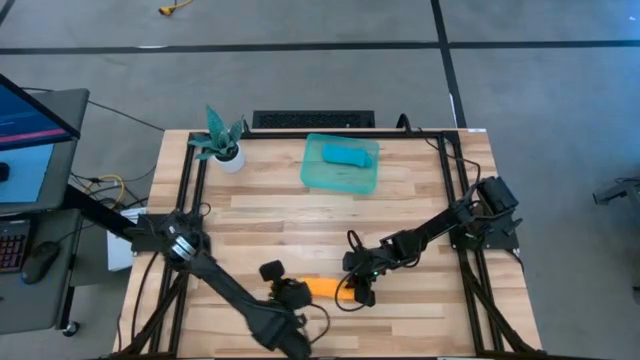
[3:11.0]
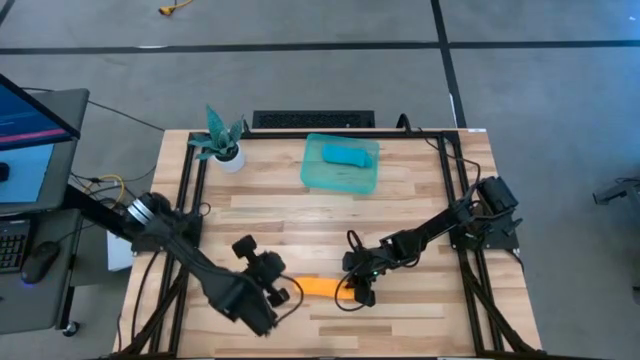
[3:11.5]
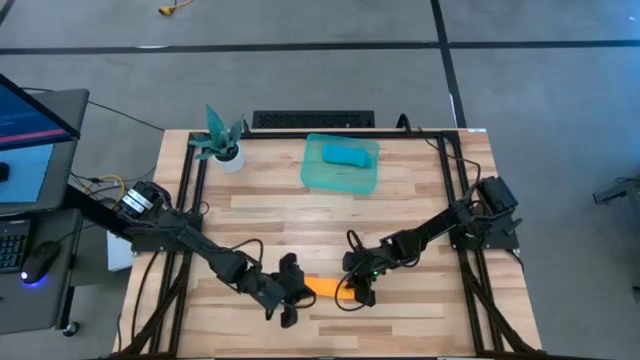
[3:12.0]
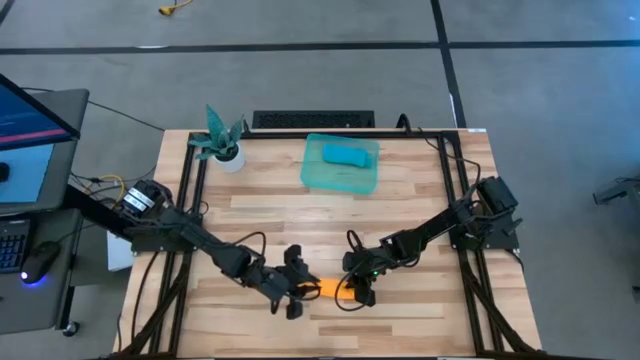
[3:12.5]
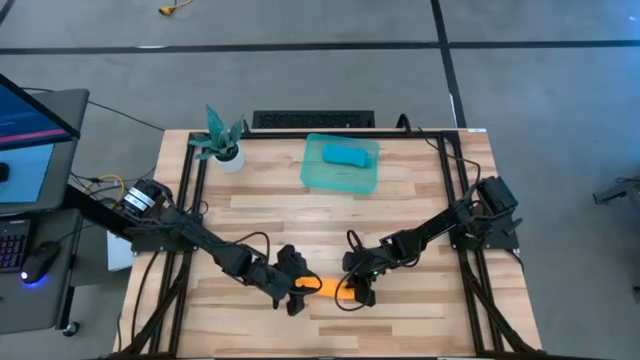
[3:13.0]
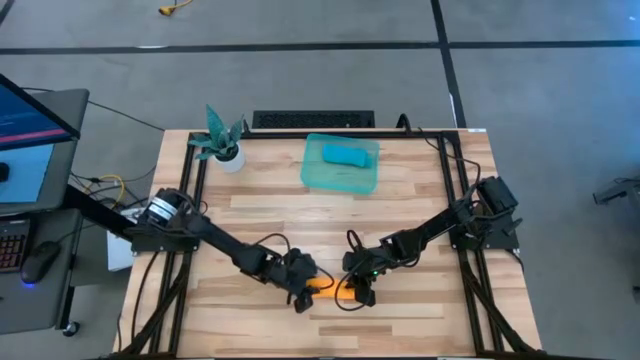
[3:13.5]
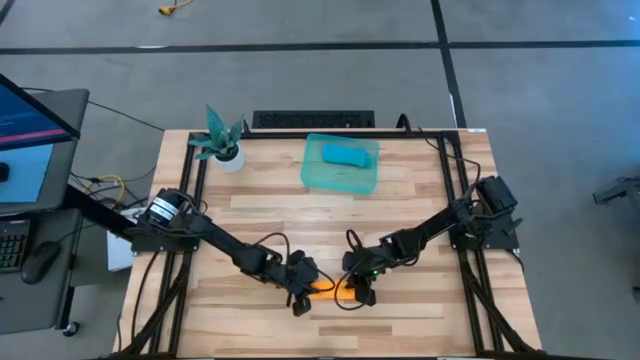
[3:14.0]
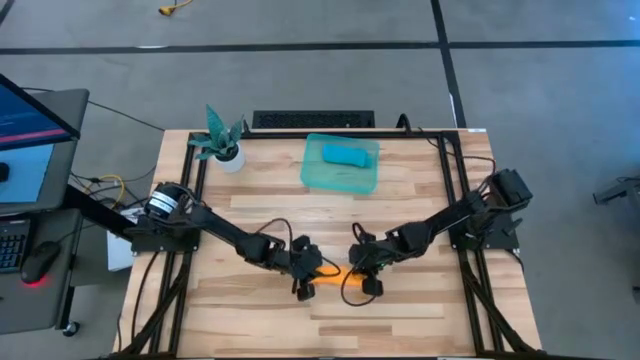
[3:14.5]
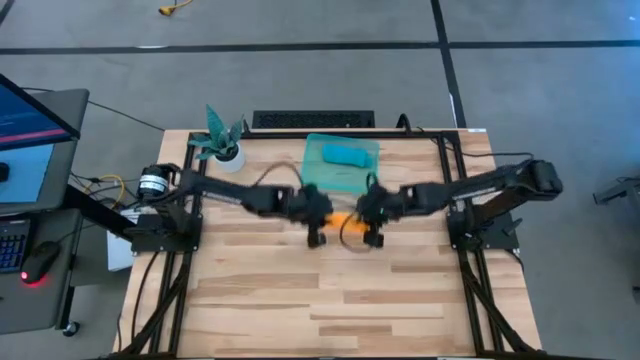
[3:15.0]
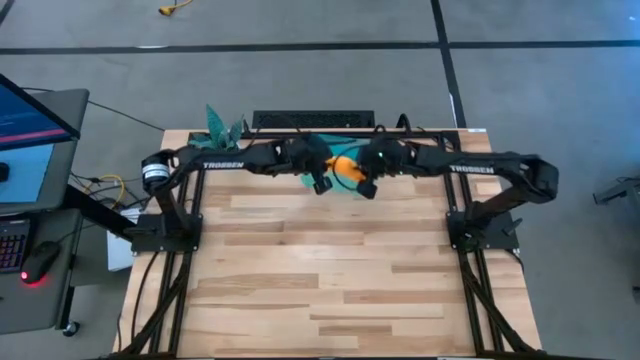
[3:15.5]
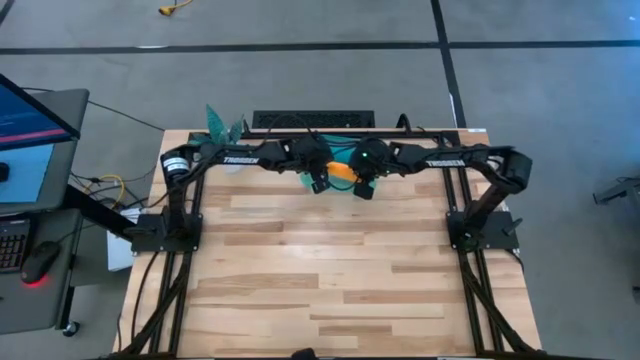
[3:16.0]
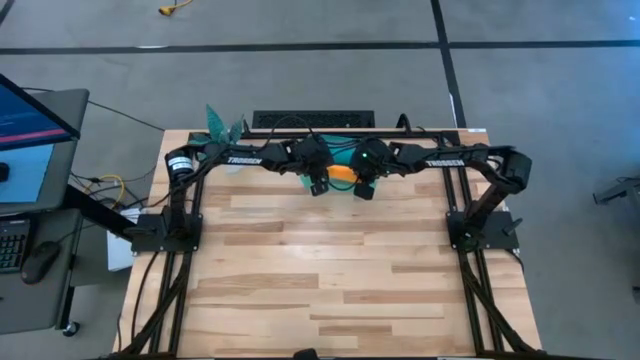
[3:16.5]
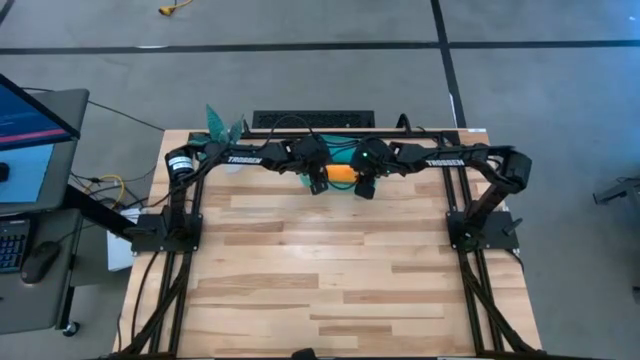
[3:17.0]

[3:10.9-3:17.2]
Task: Roll microfiber towels into tight, uniform cylinder then place into a basket
Put the rolled yellow microfiber towel into the green bin

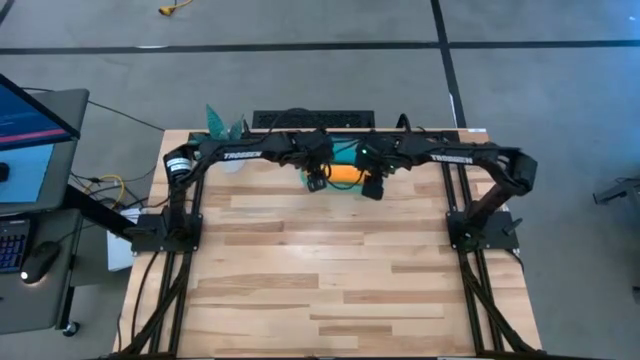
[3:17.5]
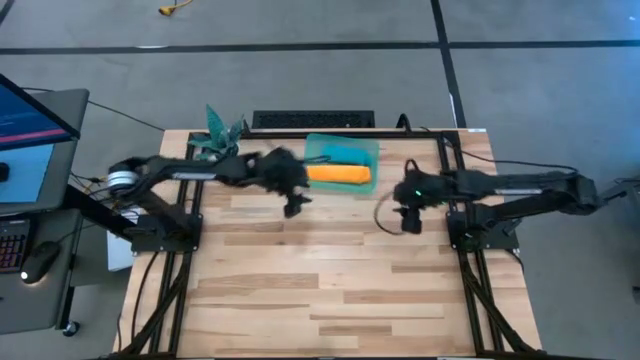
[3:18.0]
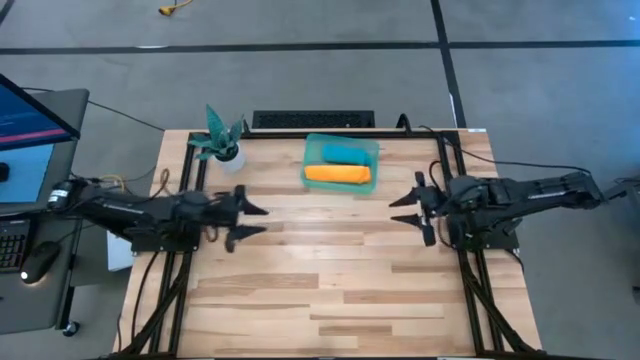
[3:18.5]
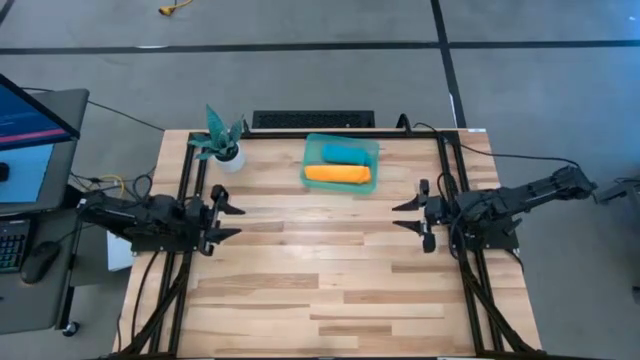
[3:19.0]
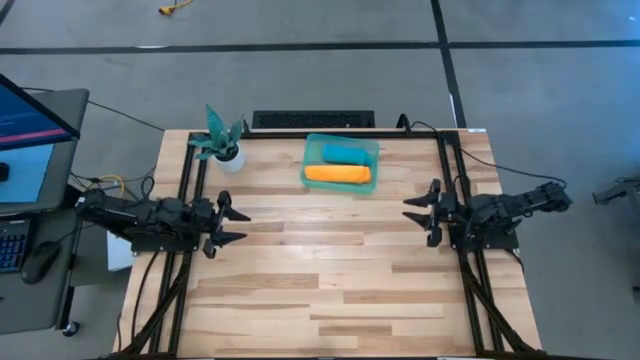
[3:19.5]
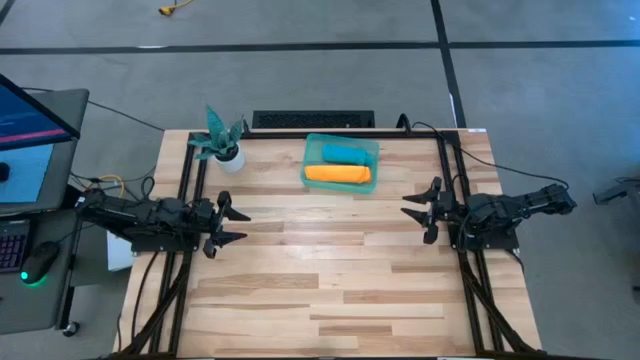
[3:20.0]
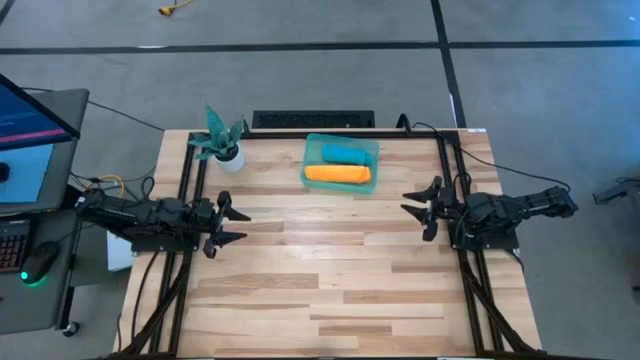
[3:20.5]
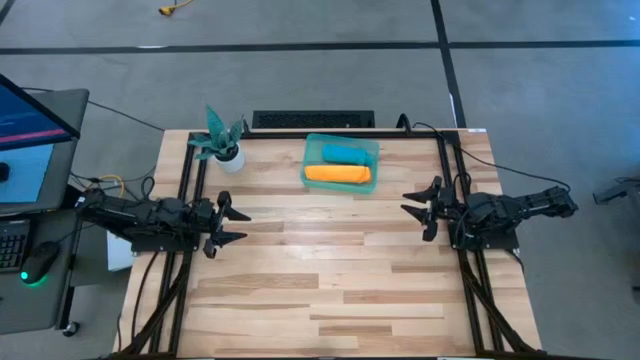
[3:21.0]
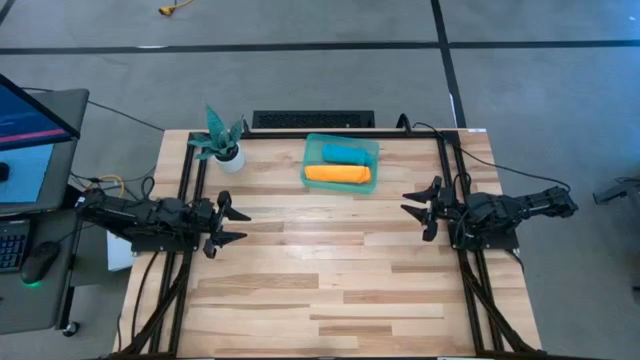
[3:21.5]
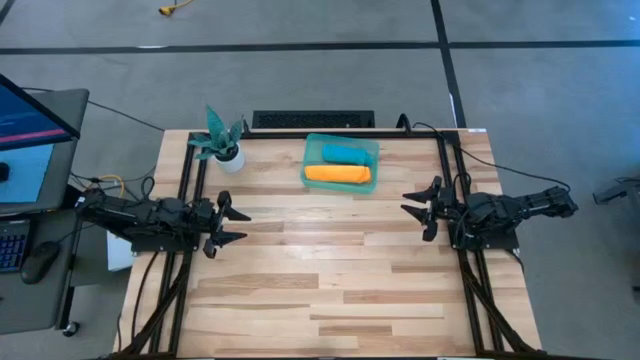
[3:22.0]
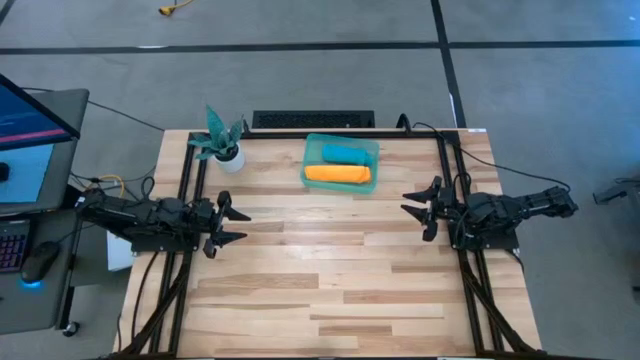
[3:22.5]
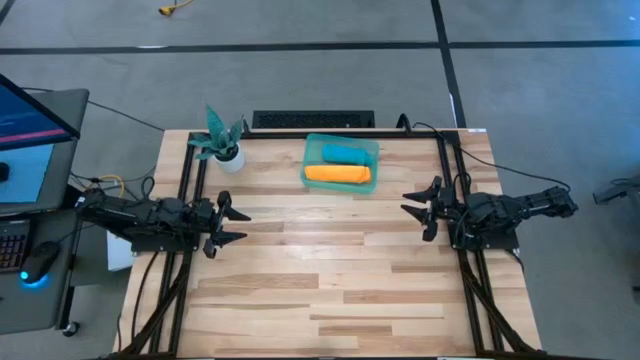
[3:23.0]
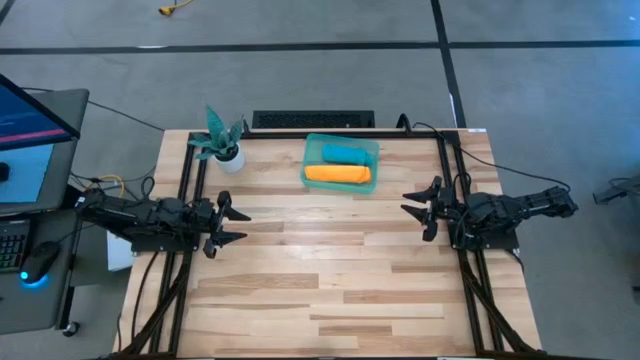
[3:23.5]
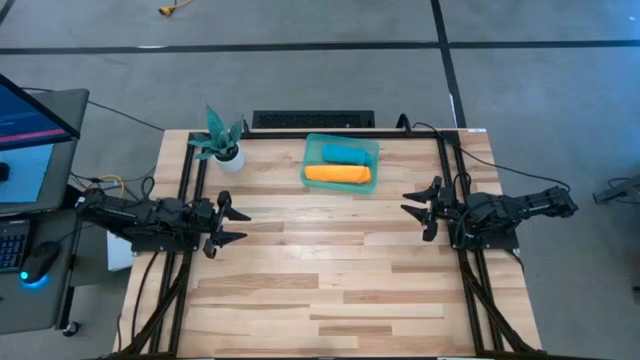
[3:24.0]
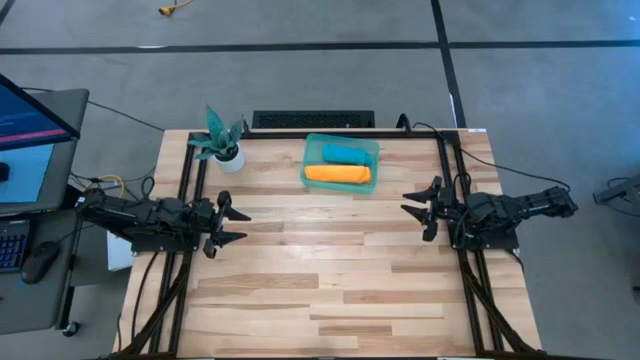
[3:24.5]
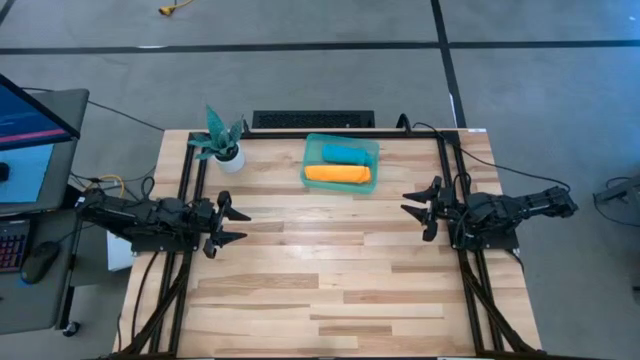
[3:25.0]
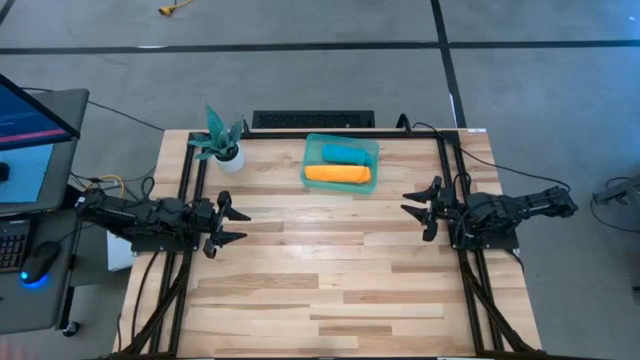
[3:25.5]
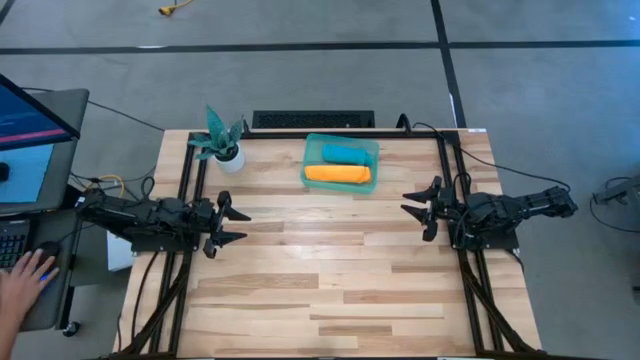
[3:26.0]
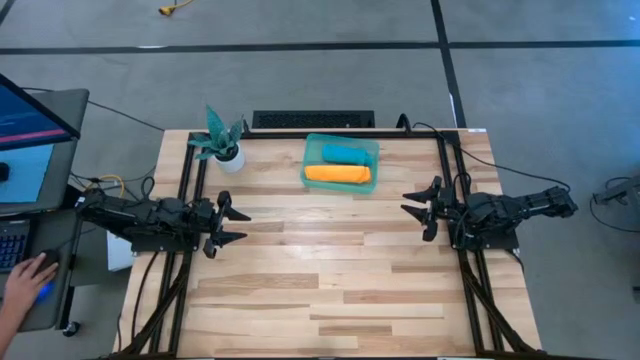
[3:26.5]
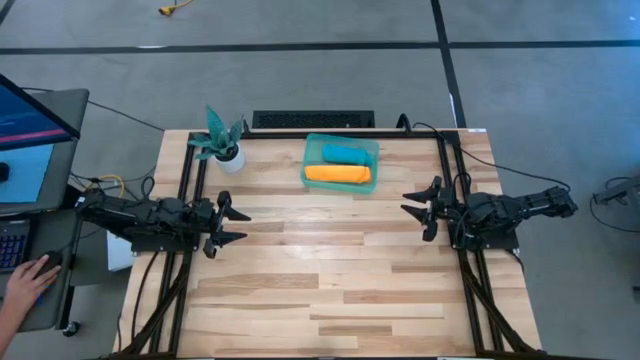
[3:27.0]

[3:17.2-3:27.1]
Return to Home Position

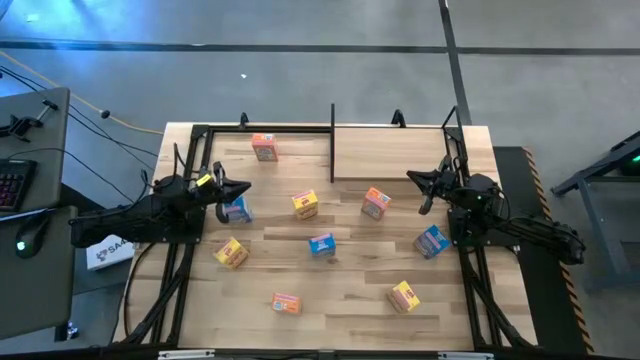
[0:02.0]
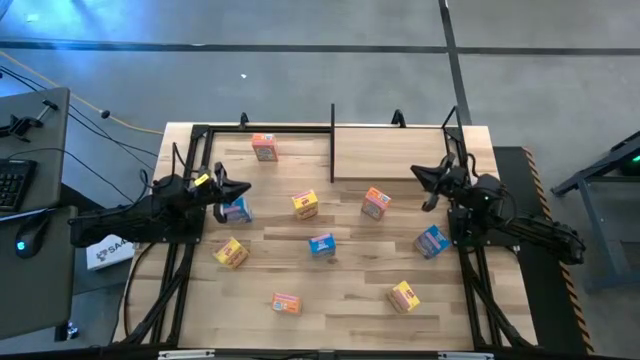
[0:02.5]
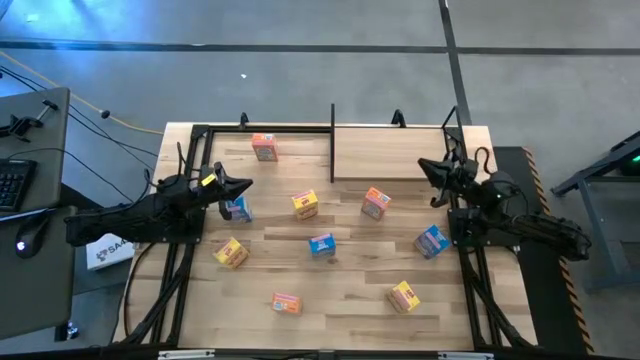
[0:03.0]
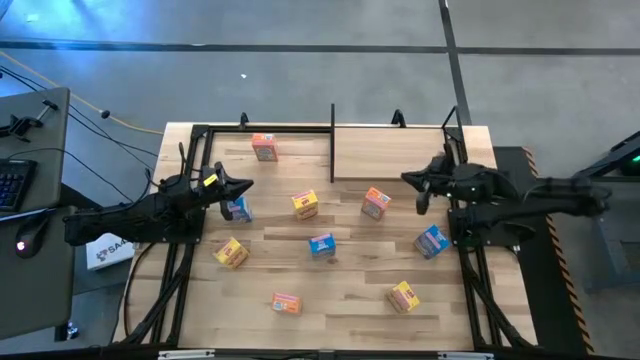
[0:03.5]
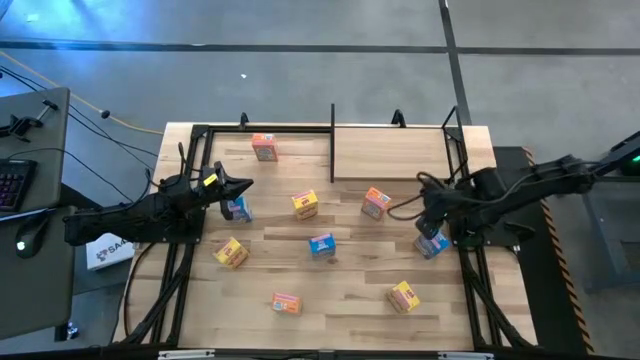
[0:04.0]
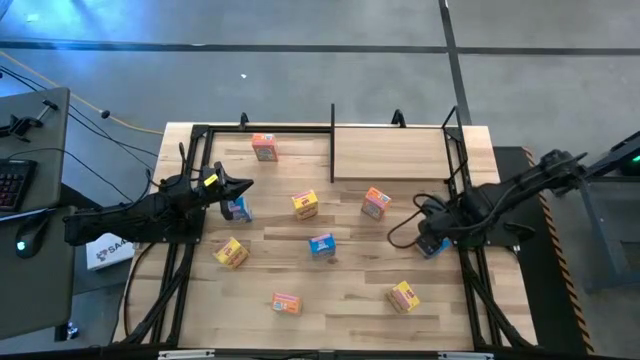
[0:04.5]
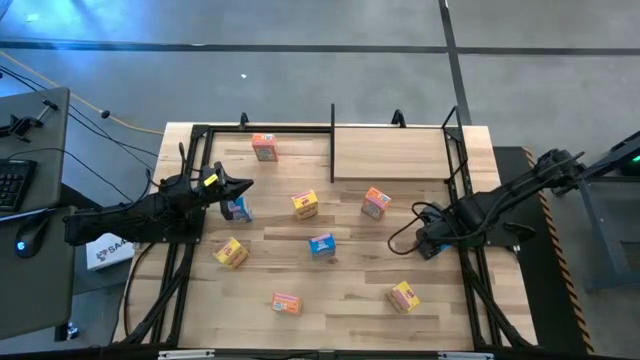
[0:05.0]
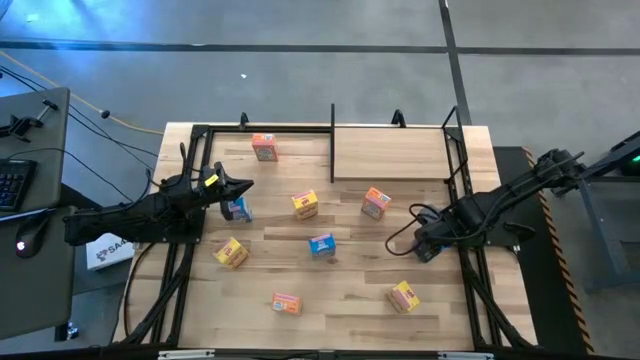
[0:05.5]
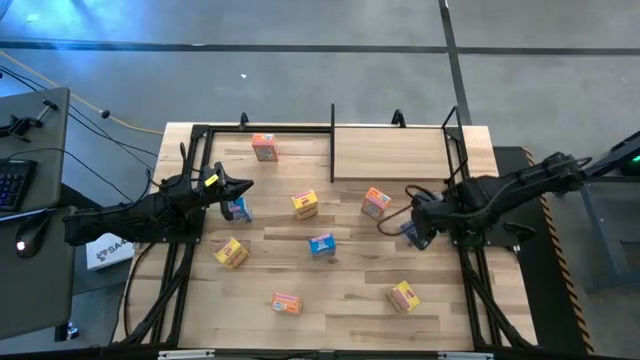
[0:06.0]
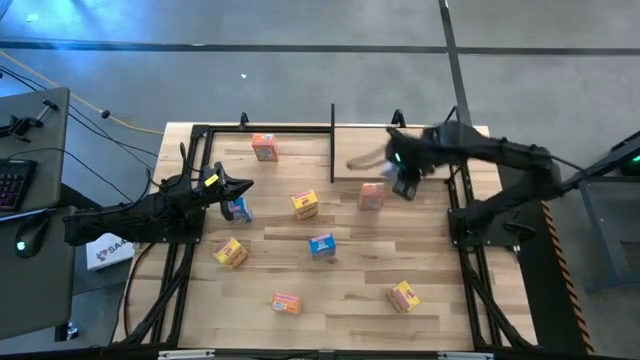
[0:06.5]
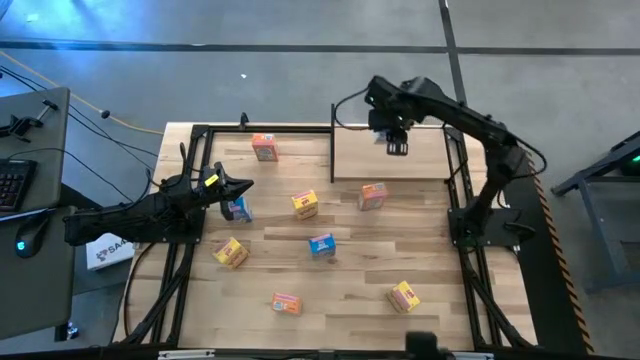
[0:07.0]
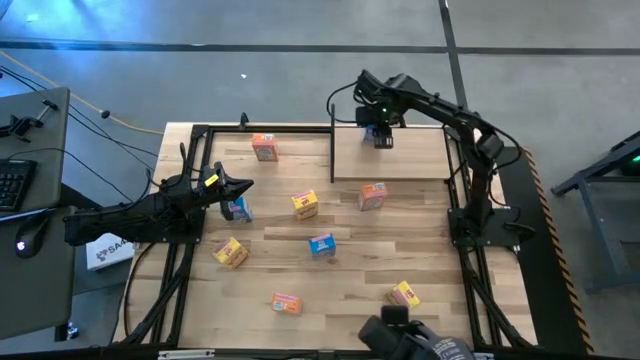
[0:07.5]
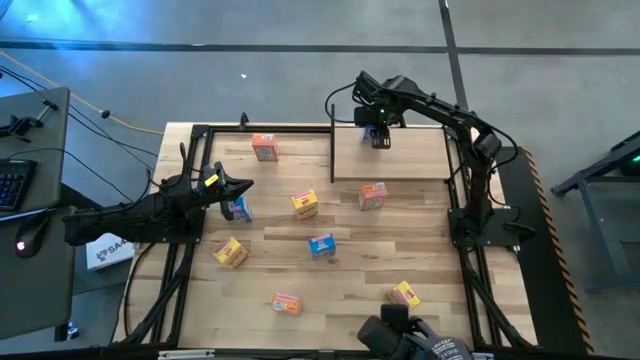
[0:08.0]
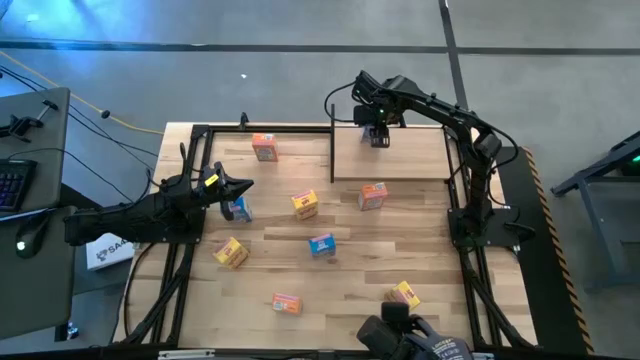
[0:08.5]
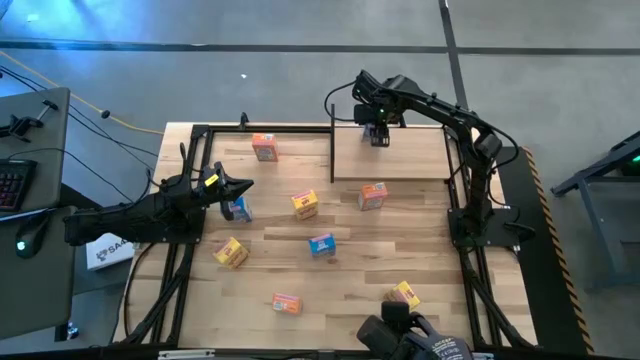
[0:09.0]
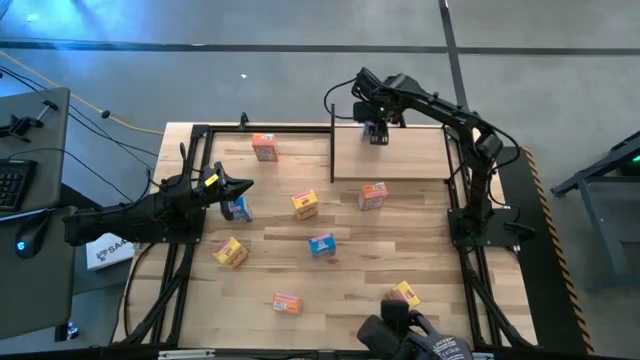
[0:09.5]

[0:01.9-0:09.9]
Task: Stack cereal on shelf
Put the middle right blue cereal box on the shelf
